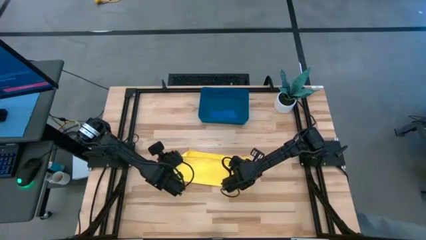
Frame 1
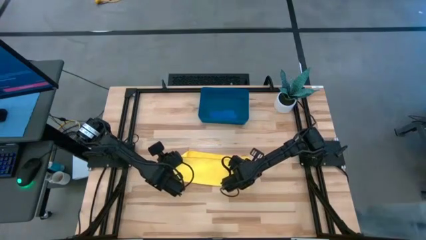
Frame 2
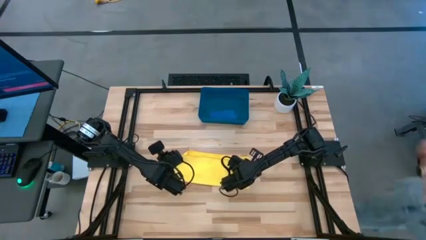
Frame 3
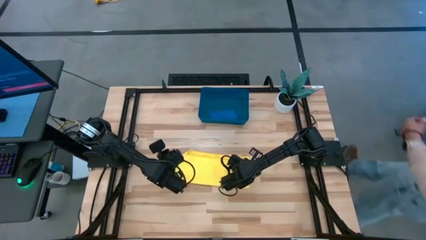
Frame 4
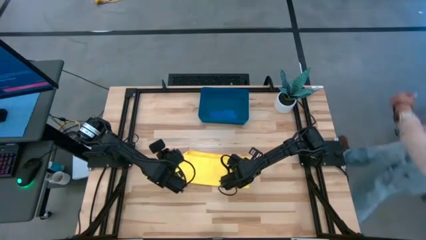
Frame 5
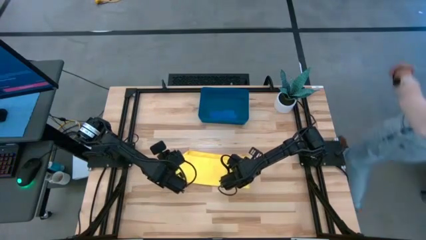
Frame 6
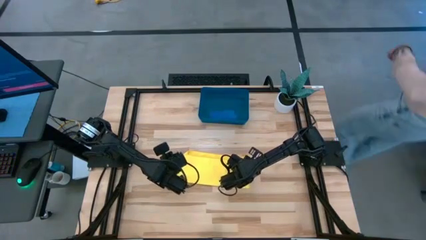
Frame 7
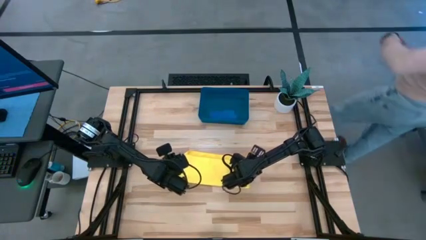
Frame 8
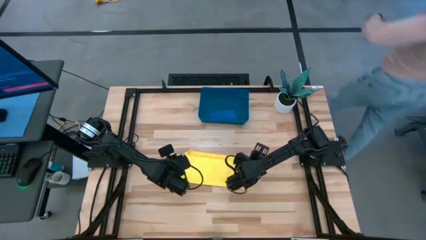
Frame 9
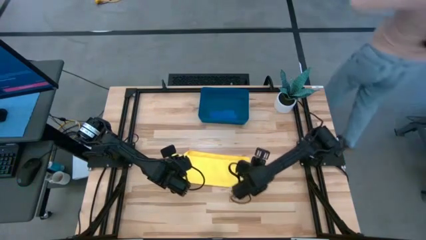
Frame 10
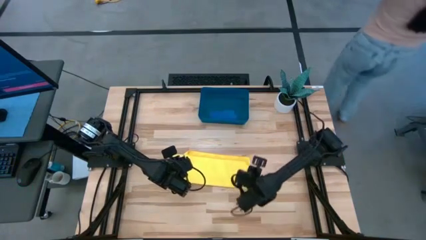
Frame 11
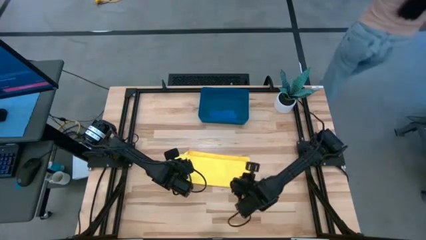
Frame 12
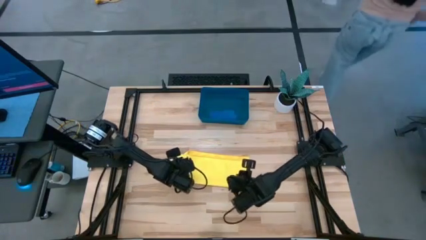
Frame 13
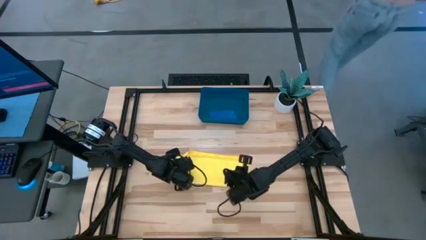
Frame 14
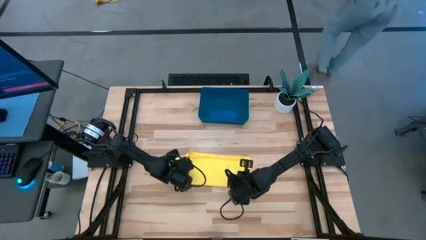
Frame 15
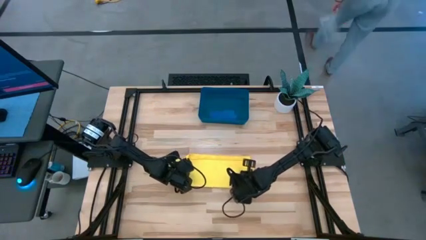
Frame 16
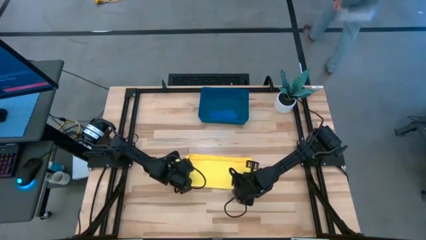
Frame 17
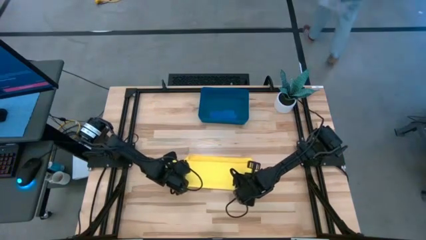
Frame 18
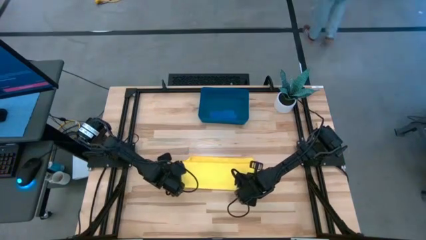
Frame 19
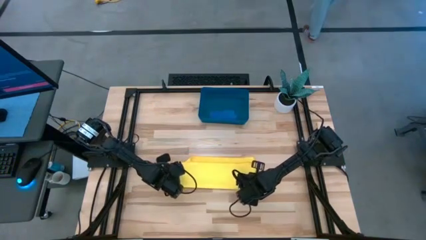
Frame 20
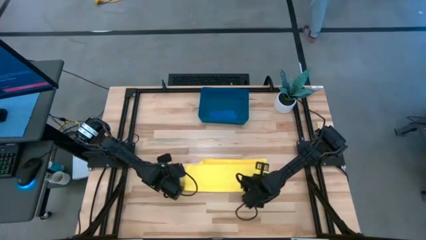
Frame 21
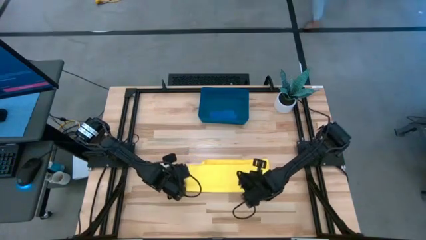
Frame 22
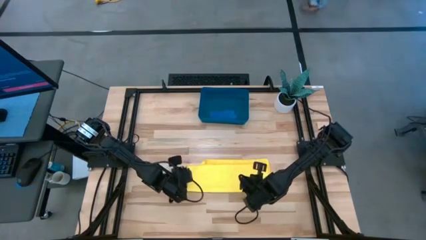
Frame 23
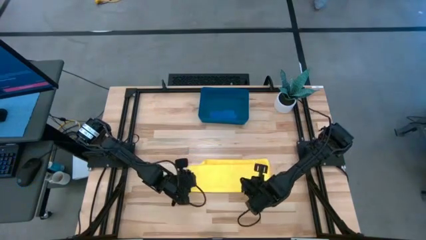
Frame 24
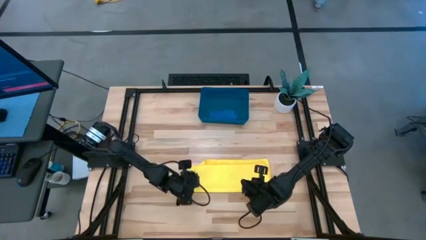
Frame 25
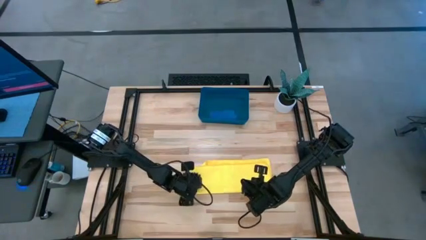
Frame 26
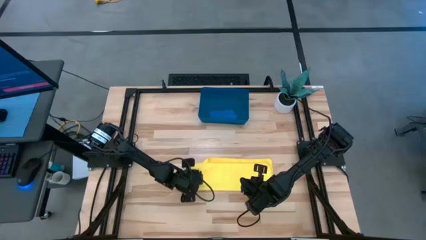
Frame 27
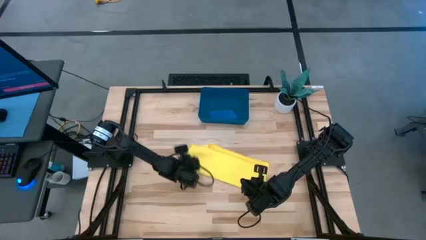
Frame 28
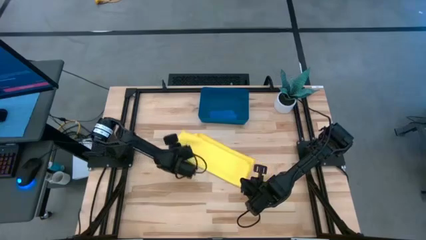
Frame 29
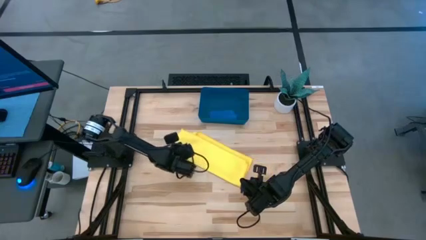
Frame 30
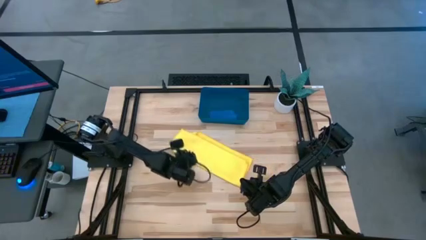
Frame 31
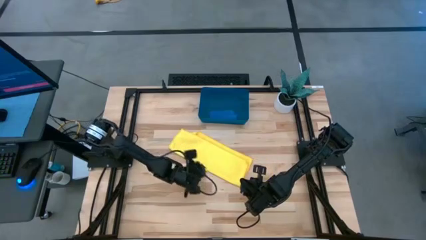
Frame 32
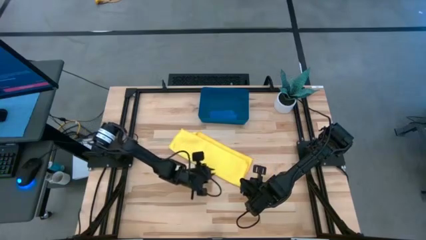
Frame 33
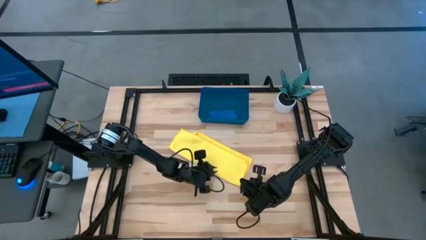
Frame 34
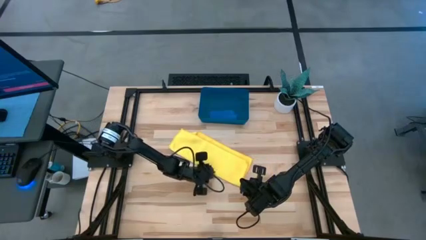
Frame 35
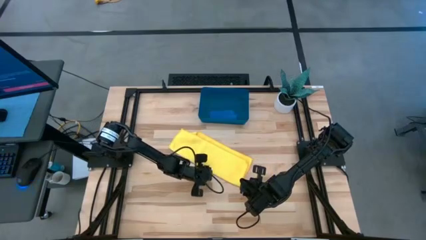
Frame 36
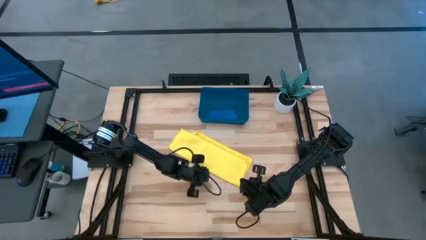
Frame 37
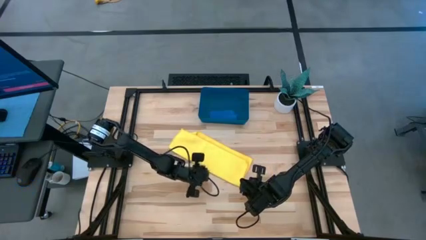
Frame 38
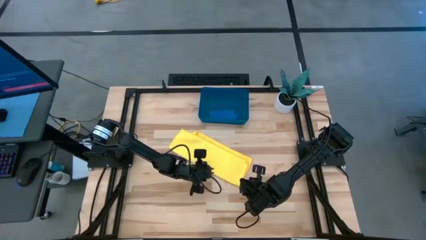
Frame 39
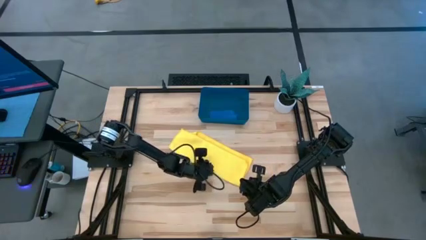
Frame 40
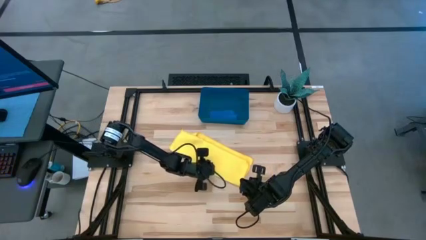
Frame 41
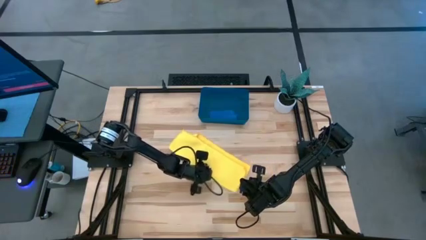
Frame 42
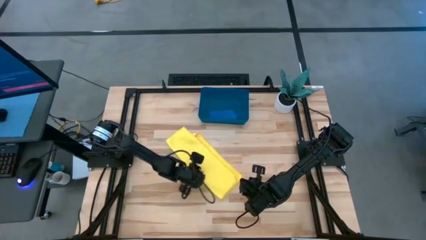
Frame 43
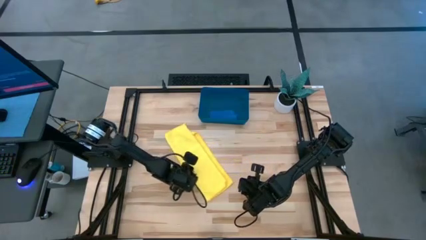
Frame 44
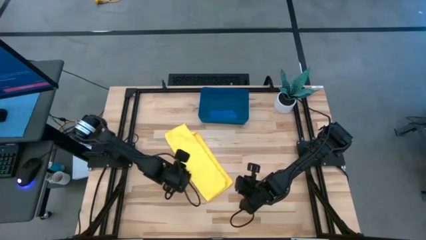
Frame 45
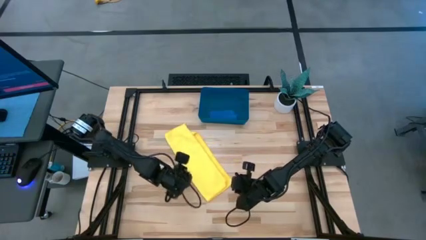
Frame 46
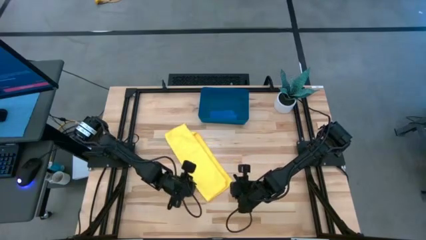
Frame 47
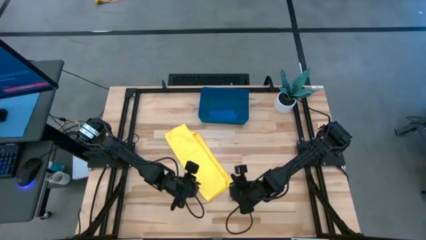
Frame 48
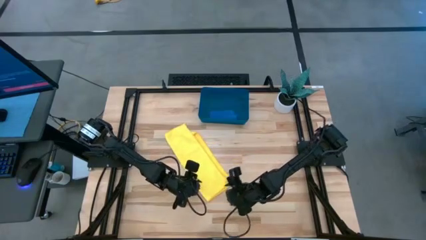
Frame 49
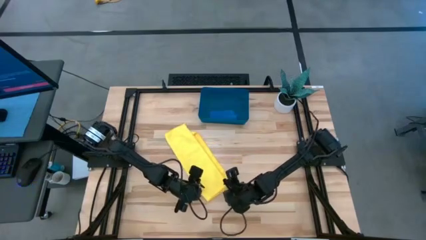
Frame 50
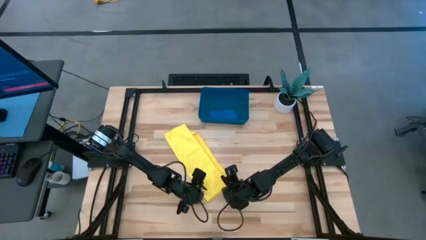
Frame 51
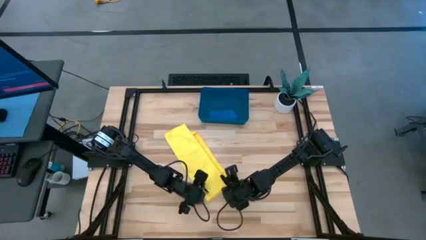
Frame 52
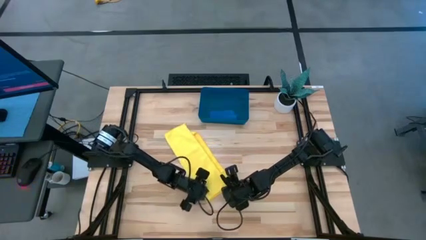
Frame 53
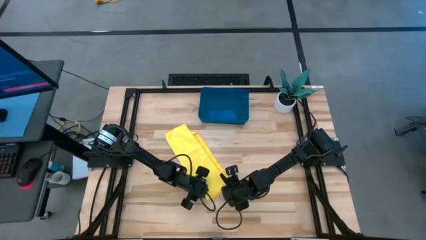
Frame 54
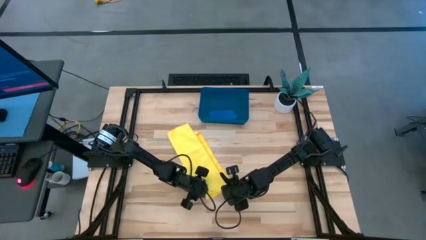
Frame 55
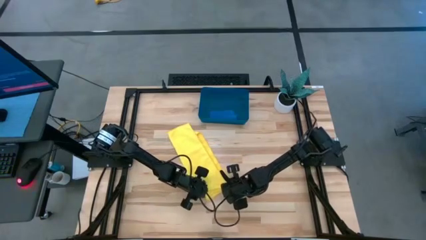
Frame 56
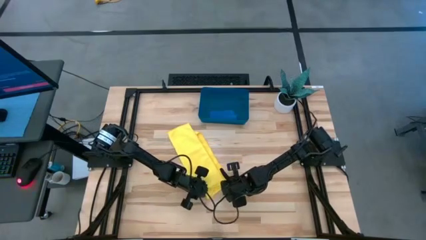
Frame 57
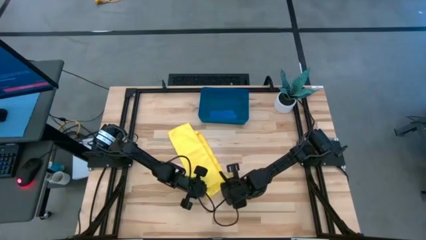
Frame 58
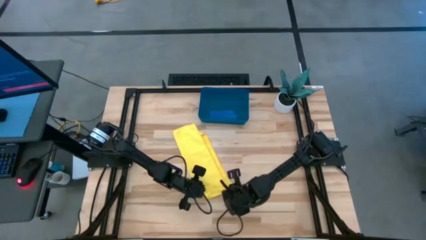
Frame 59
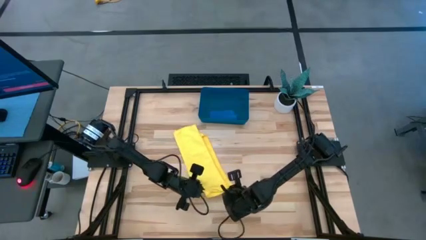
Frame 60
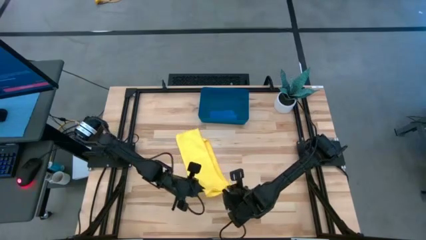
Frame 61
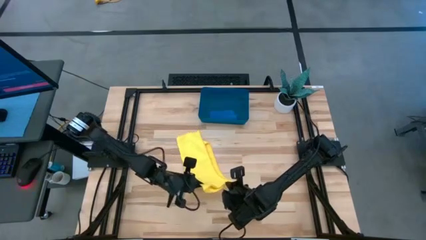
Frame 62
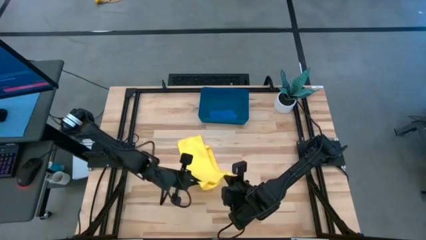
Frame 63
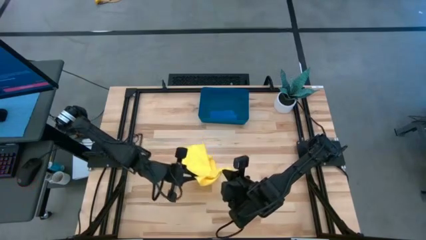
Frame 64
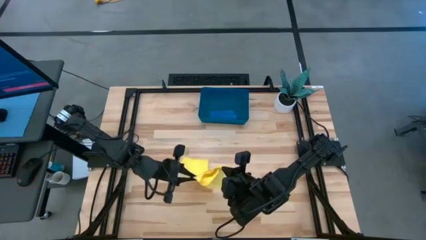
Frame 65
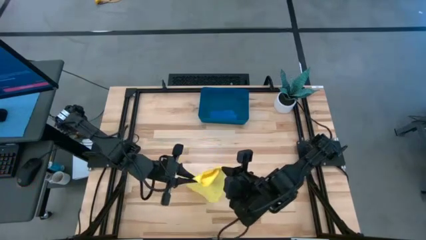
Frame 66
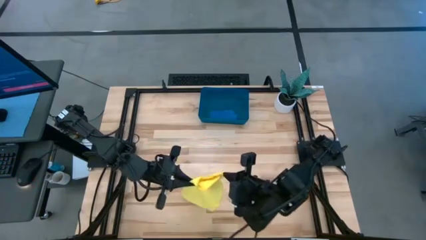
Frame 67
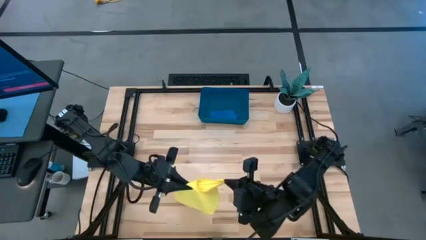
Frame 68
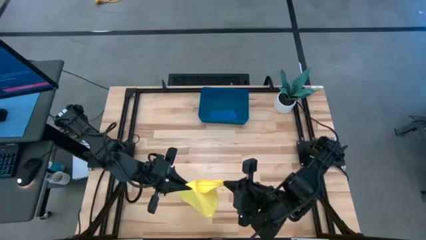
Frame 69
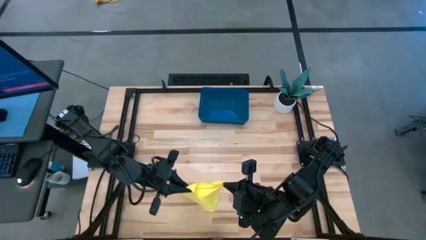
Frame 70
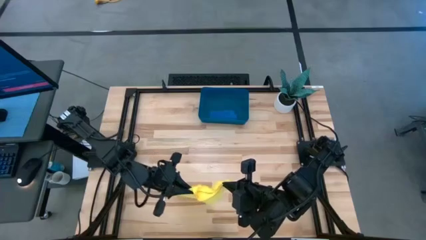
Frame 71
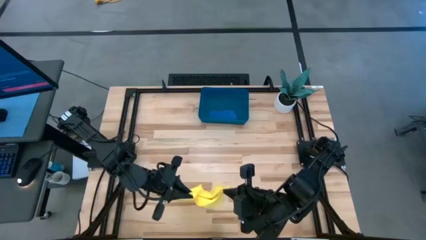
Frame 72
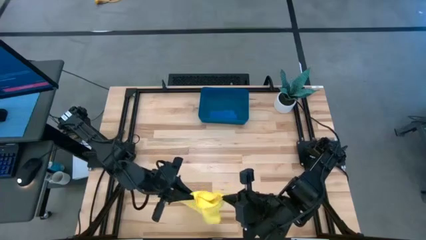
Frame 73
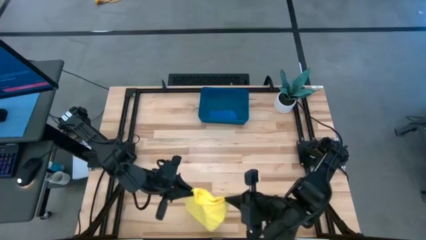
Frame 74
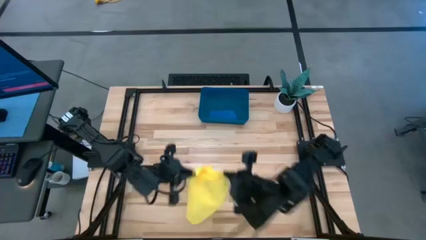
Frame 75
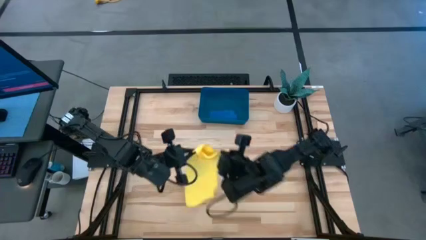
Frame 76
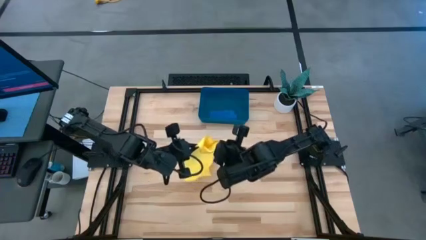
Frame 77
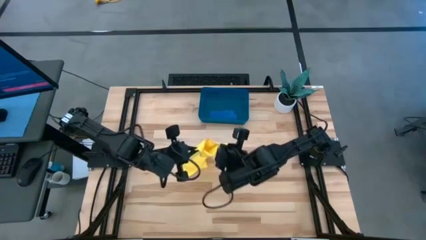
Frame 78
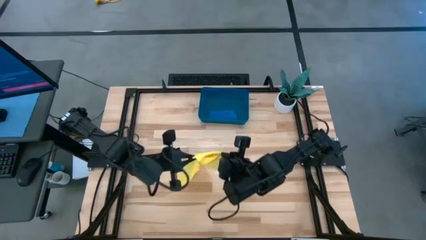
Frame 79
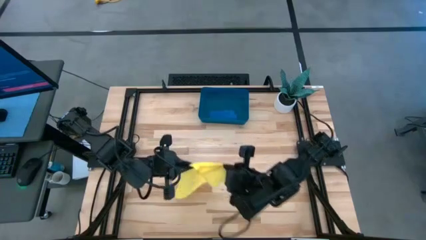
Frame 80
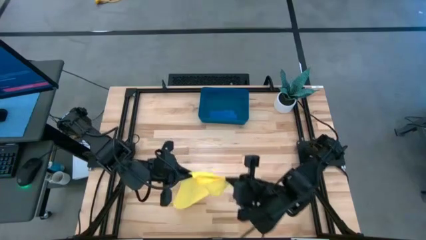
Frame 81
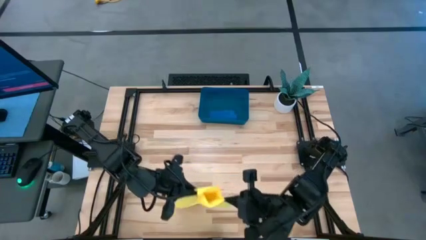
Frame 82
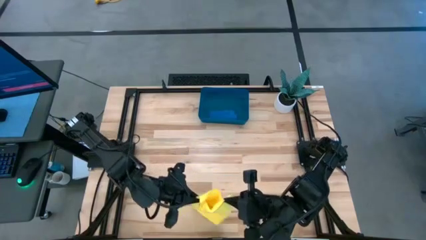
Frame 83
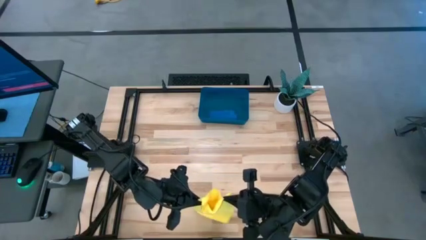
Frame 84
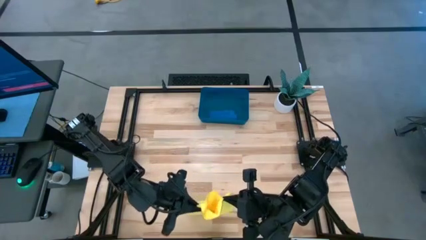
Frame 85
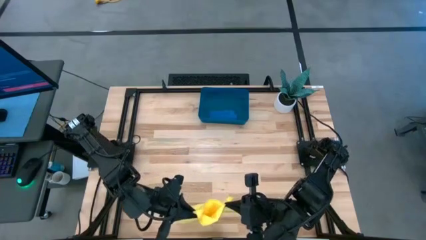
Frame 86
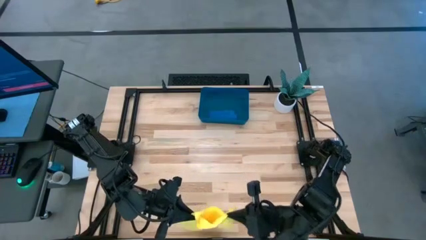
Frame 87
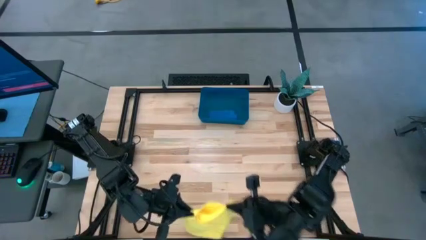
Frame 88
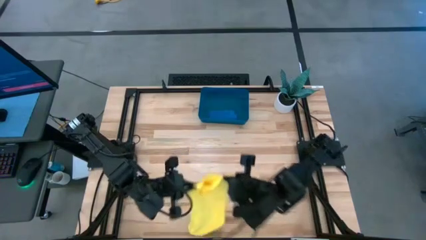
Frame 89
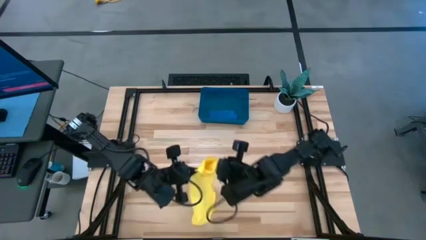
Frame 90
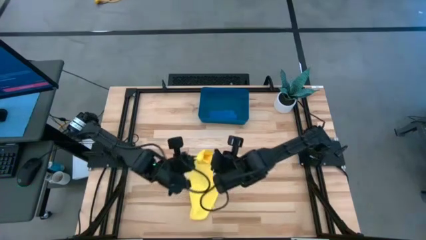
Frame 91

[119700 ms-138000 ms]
Task: Roll microfiber towels into tight, uniform cylinder then place into a basket
Roll the yellow microfiber cloth
